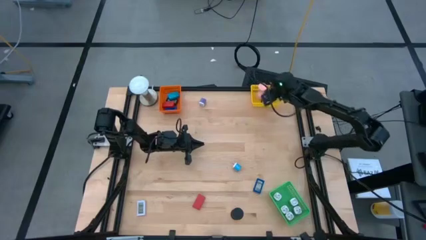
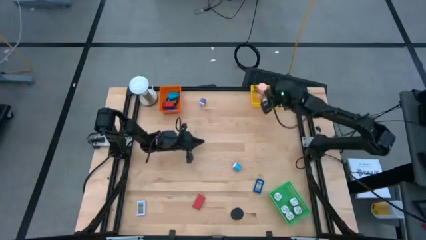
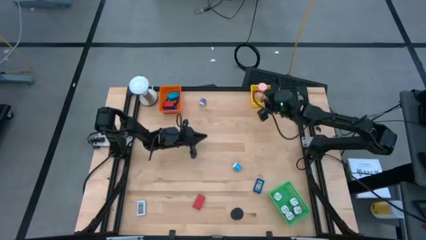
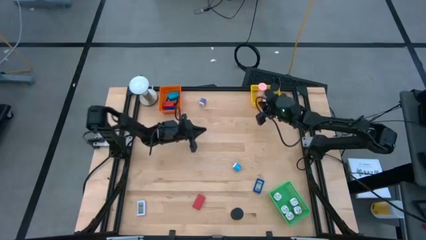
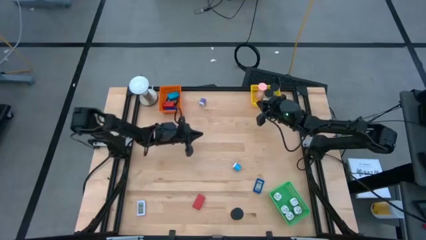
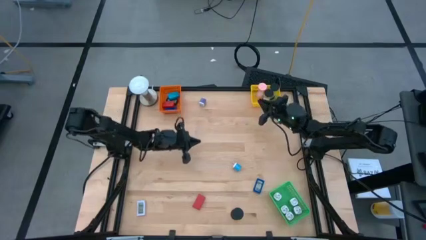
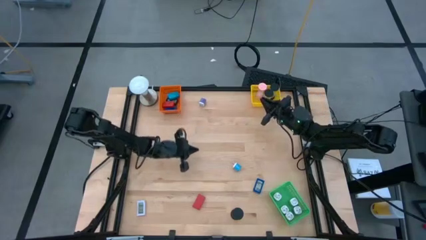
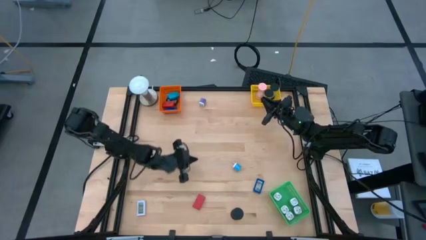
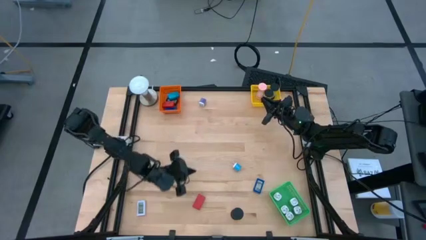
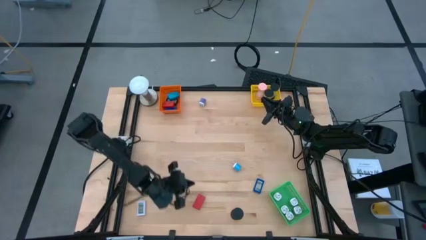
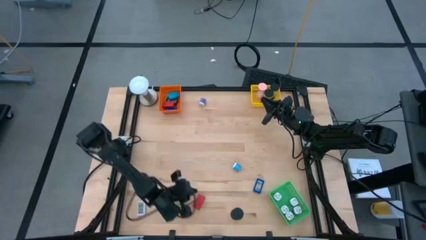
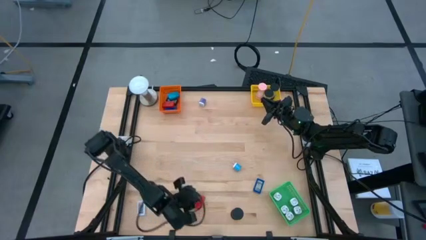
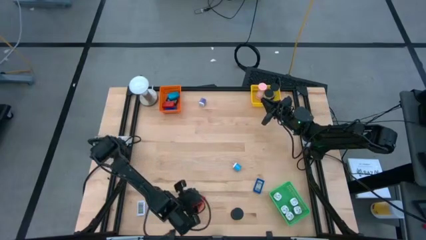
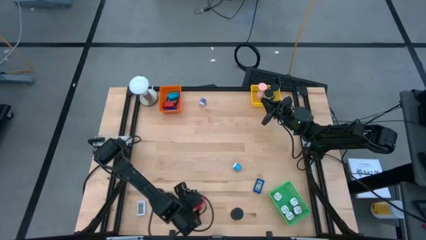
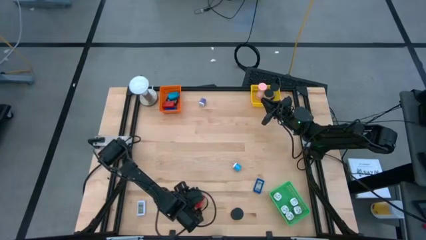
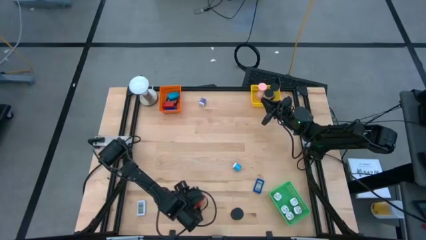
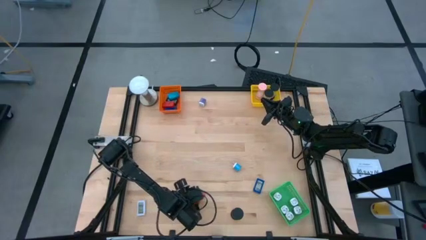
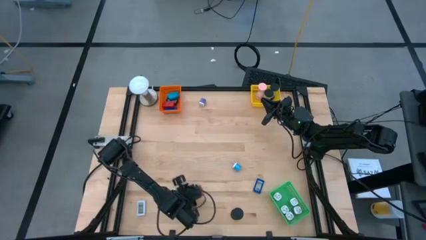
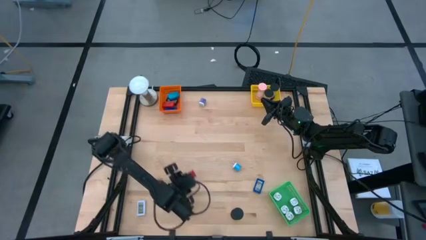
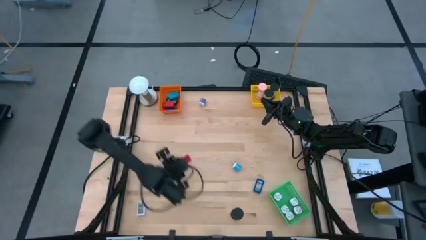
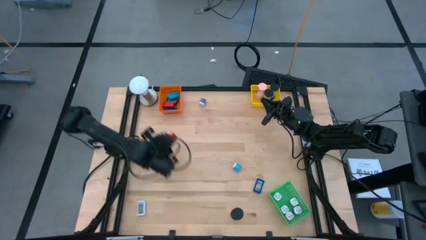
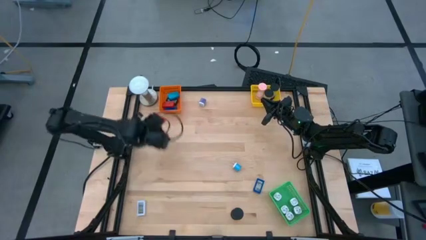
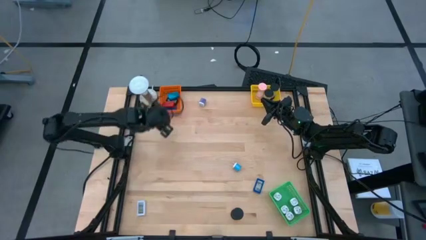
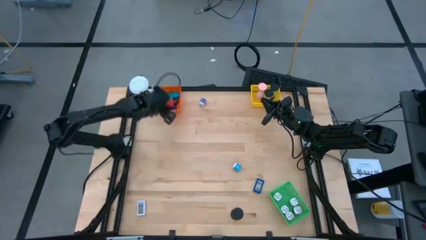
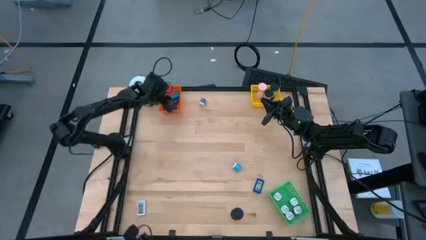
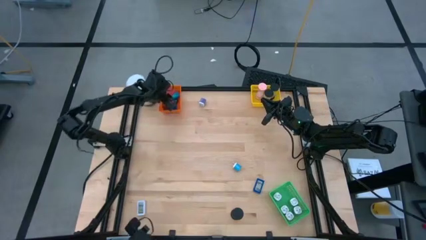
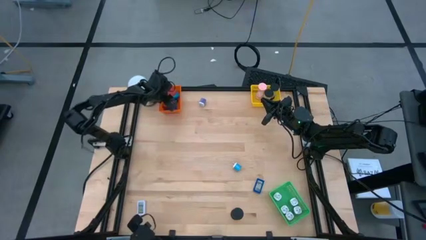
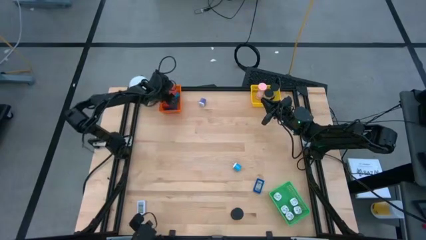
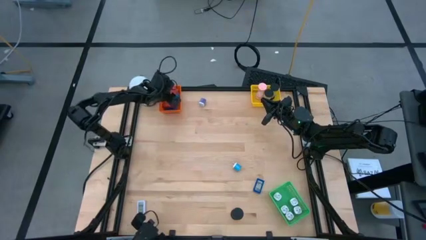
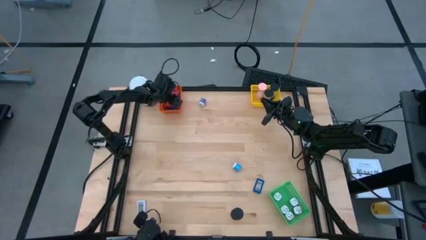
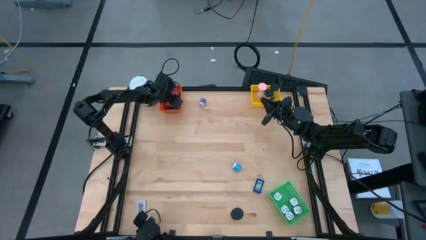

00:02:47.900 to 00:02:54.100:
Task: Pick & Place Office items
Put the red digital clock into the orange bin

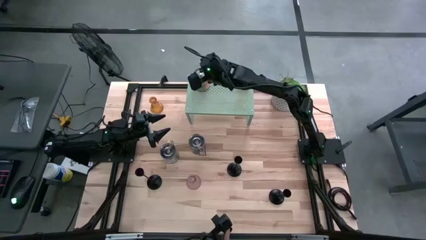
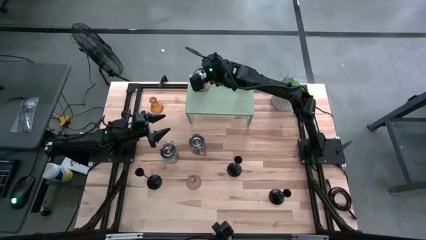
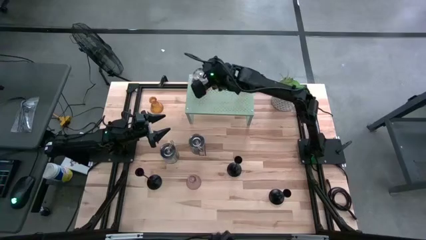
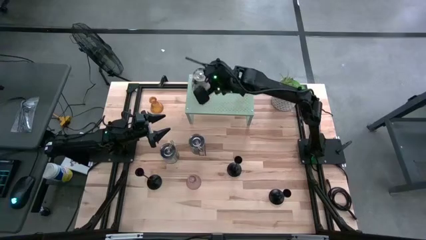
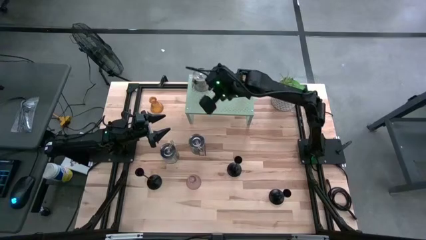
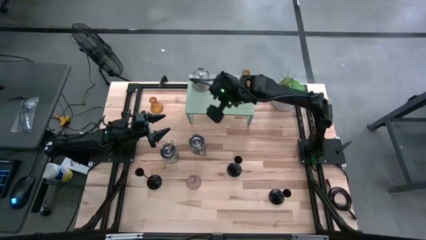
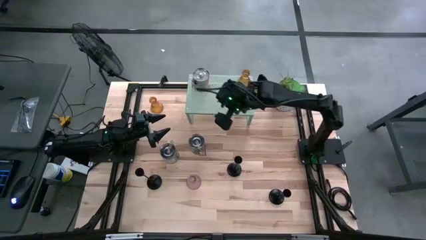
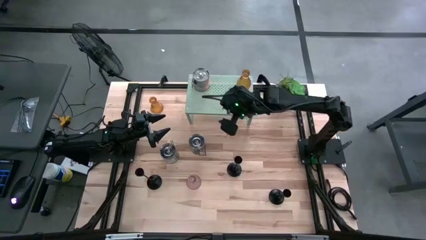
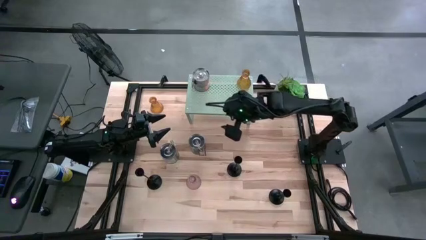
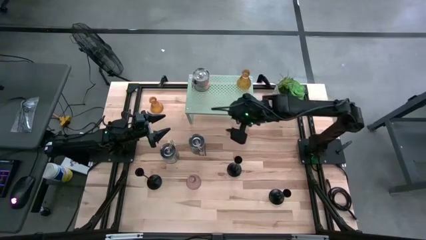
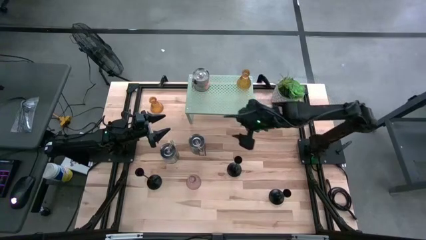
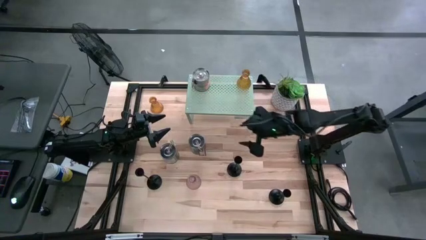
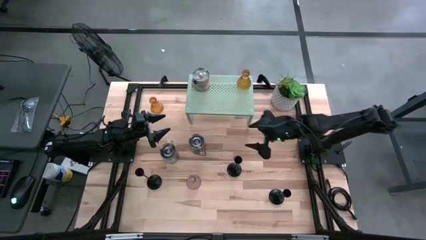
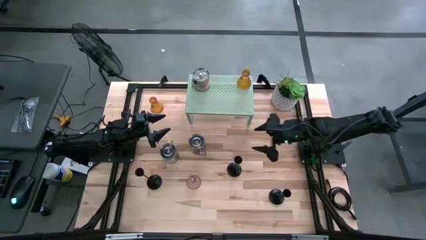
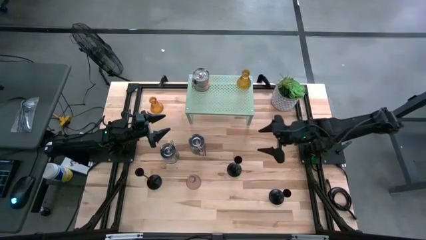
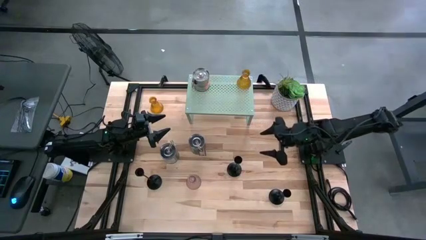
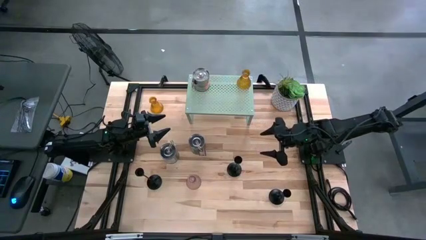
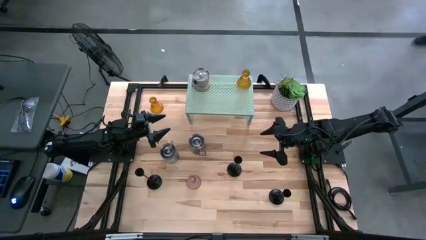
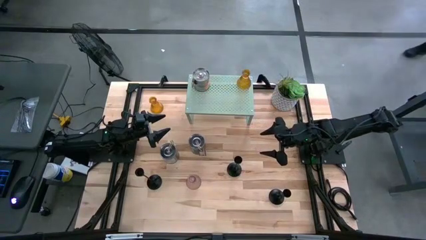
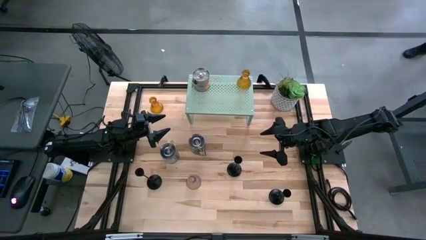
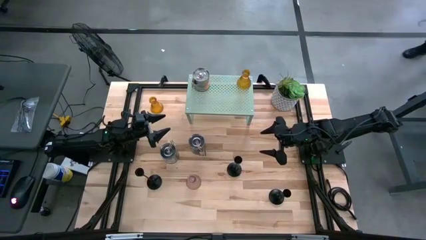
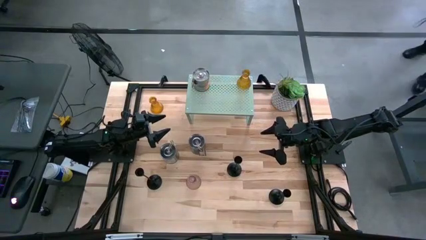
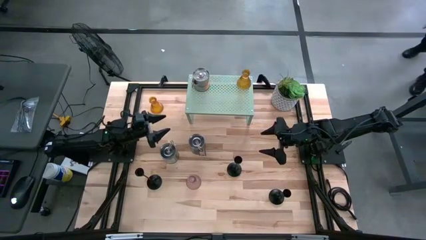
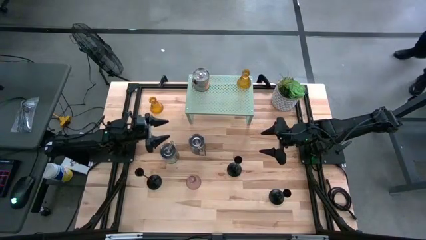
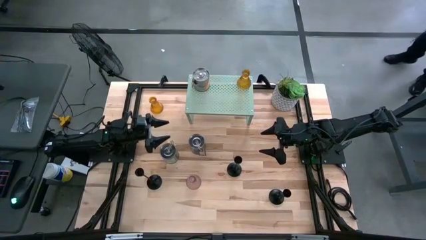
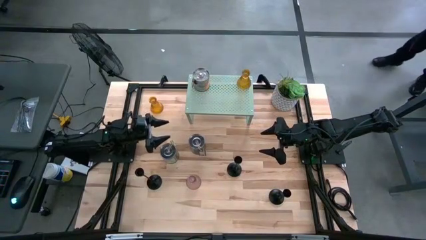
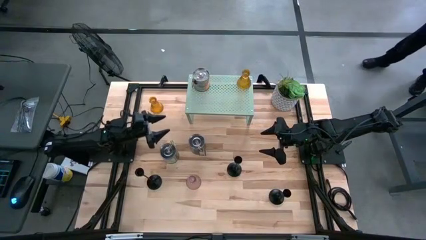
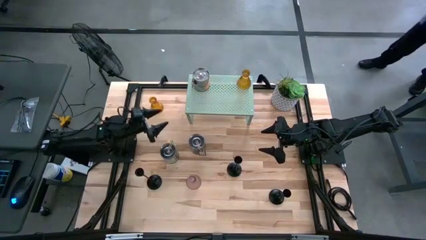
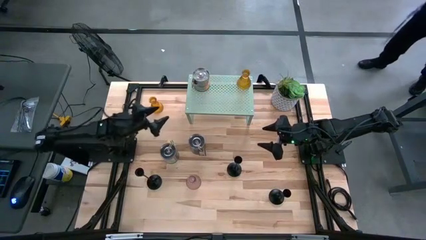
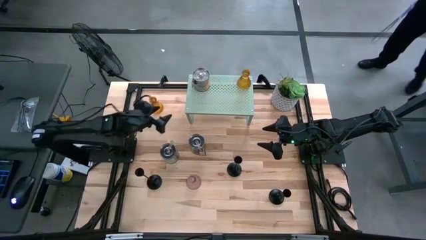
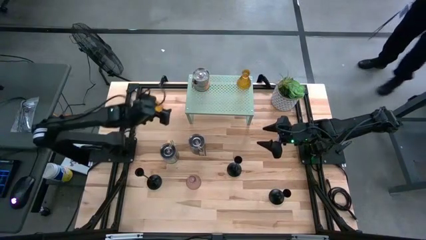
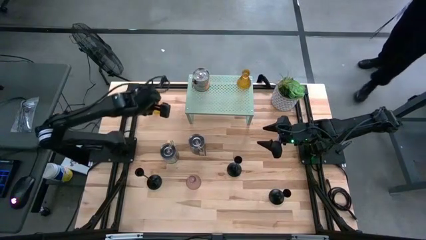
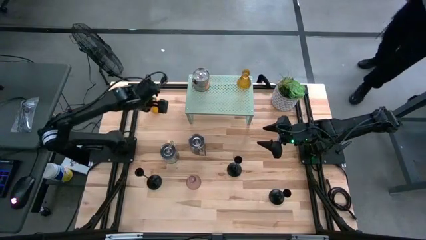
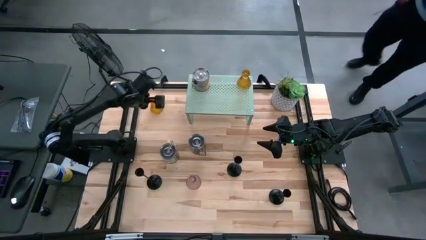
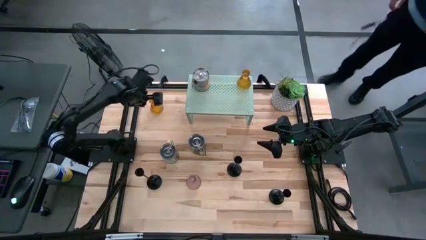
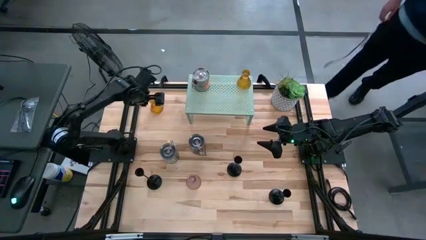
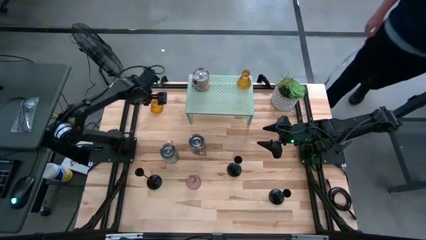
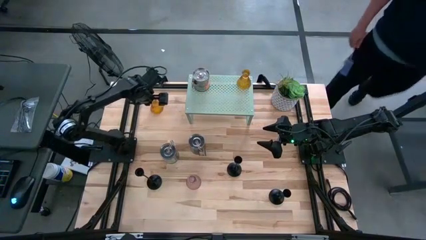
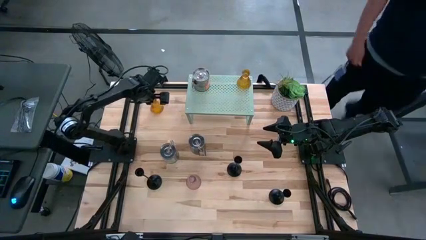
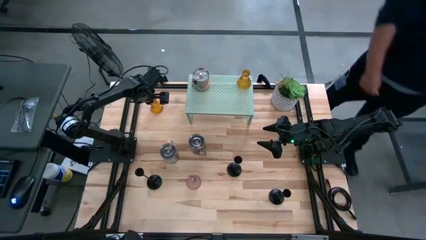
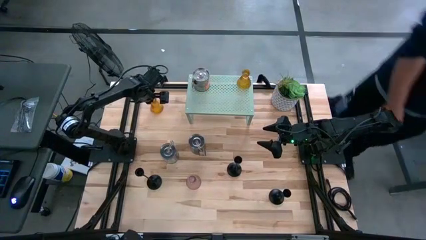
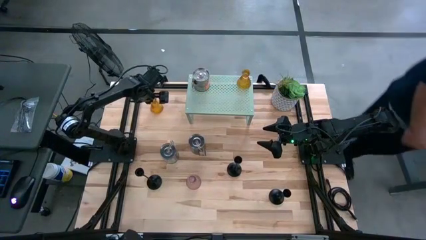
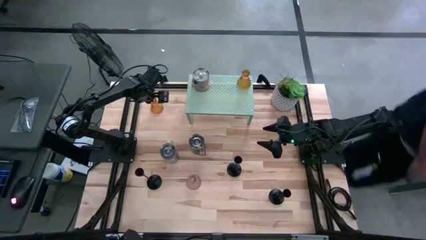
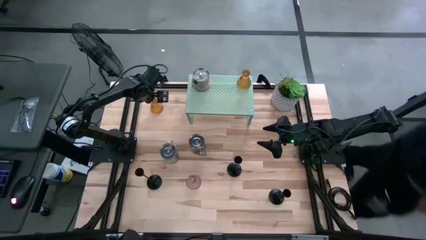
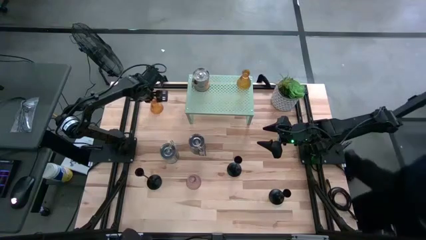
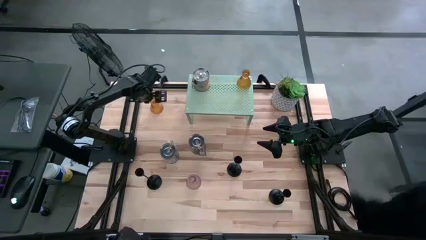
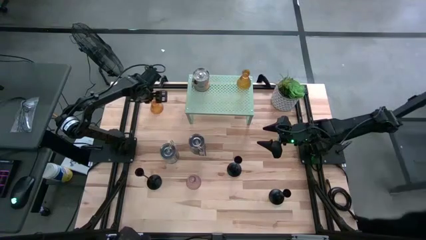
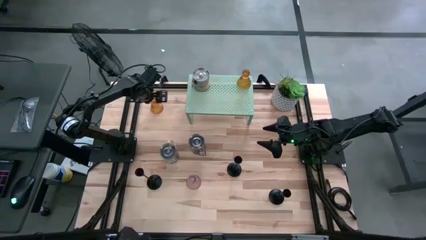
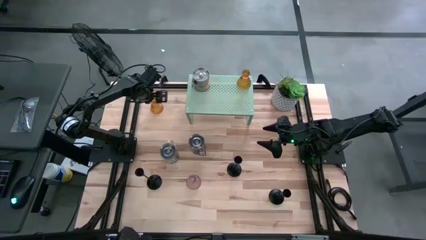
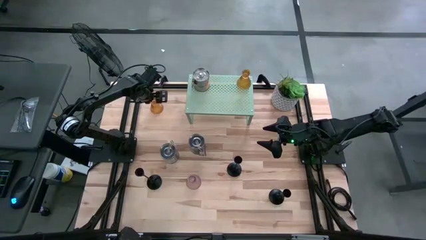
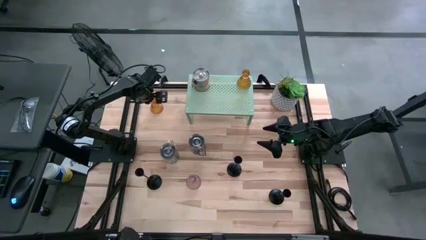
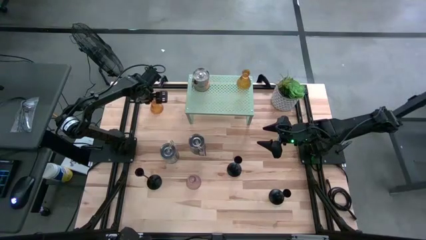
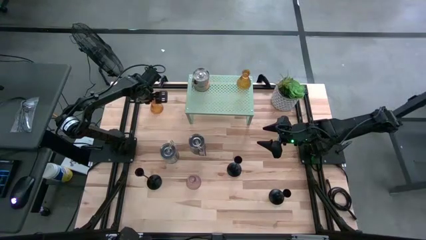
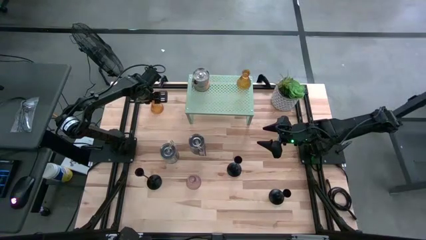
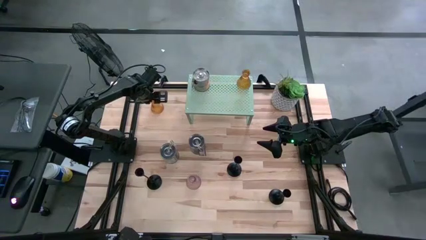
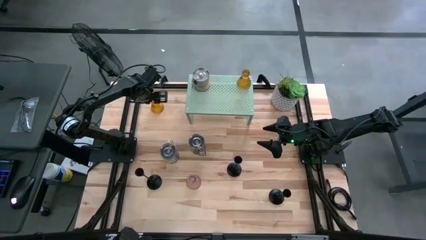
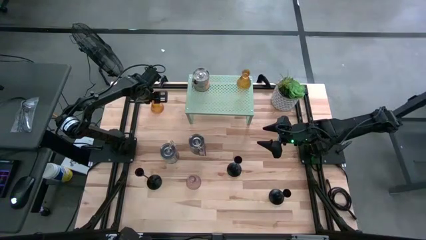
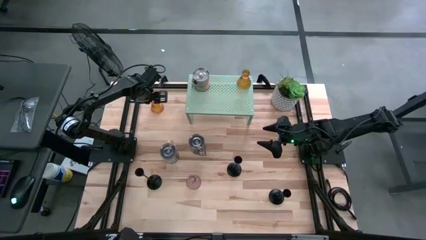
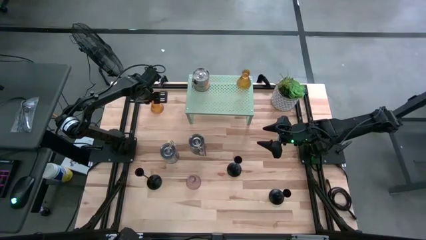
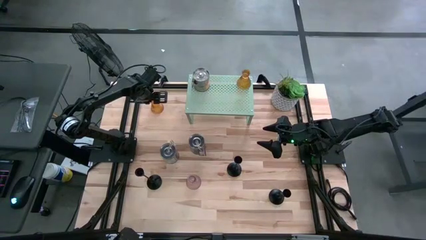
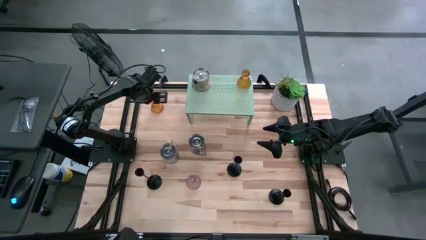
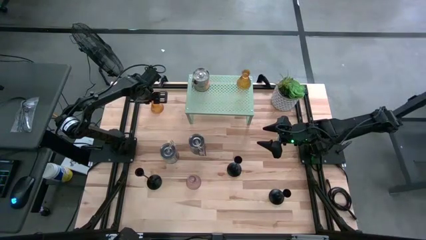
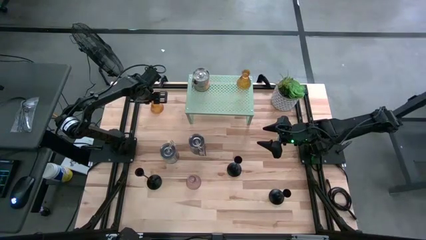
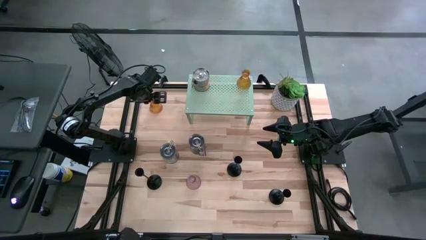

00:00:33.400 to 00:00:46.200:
Task: Pick & Place candle stick holders
Put the orange candle holder on the shelf
